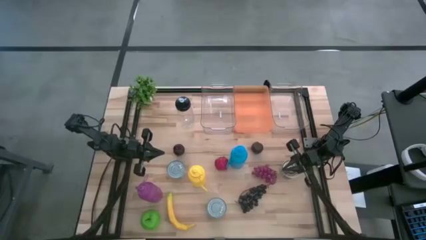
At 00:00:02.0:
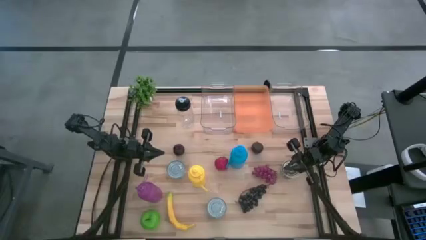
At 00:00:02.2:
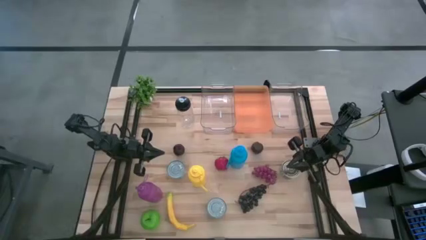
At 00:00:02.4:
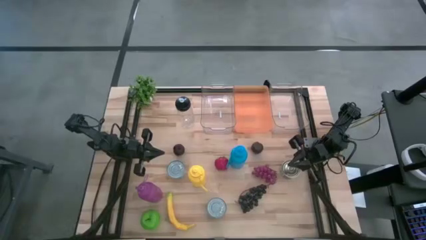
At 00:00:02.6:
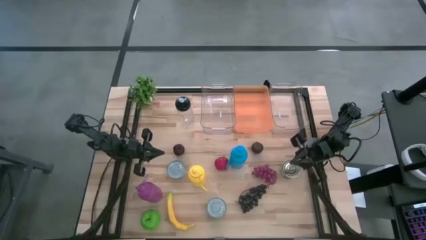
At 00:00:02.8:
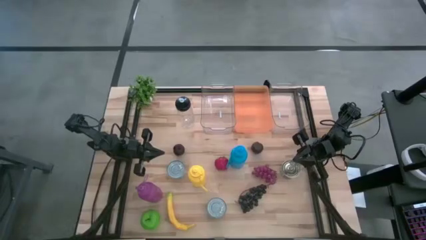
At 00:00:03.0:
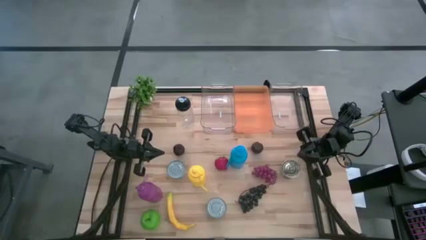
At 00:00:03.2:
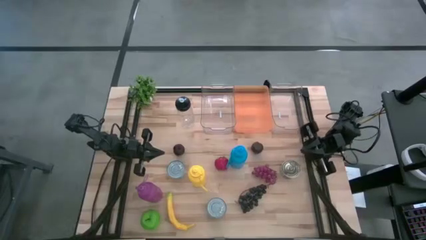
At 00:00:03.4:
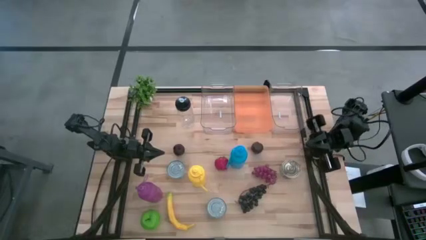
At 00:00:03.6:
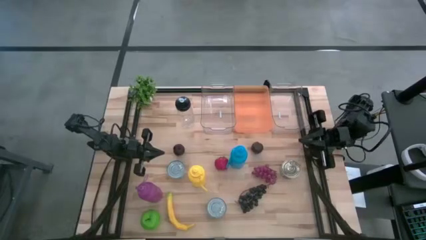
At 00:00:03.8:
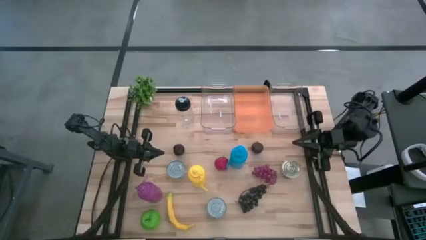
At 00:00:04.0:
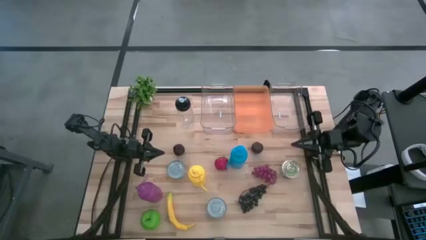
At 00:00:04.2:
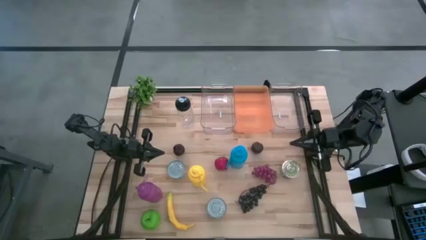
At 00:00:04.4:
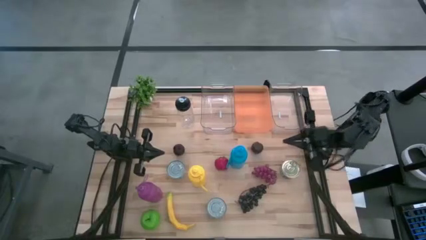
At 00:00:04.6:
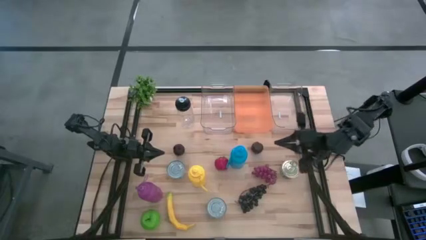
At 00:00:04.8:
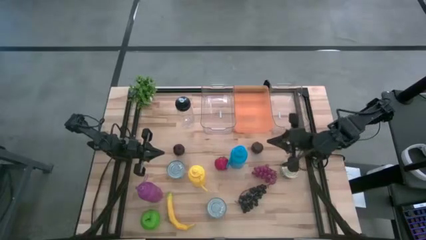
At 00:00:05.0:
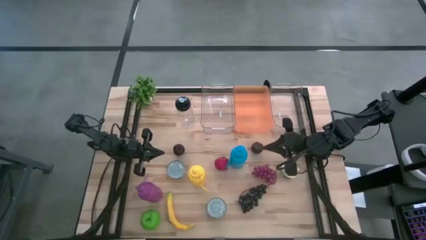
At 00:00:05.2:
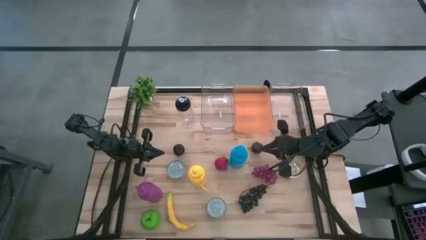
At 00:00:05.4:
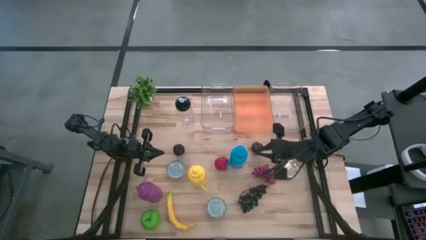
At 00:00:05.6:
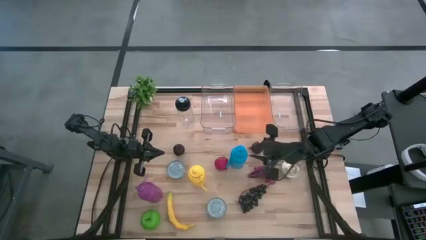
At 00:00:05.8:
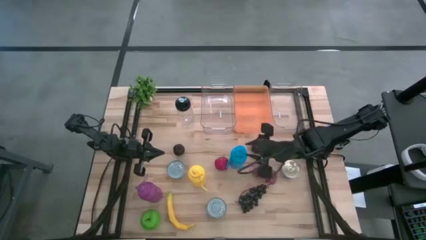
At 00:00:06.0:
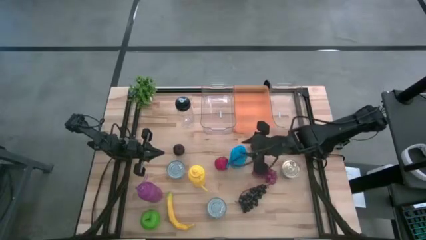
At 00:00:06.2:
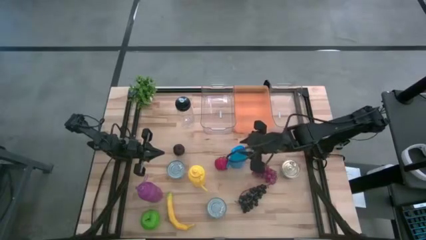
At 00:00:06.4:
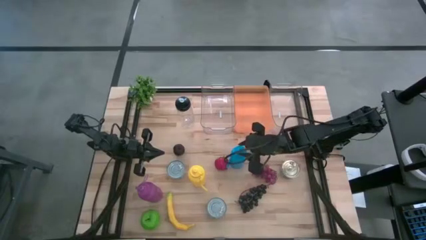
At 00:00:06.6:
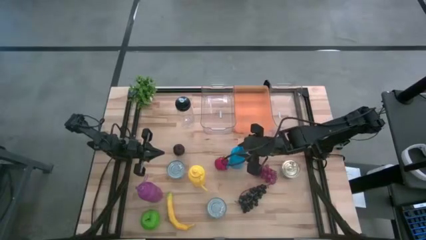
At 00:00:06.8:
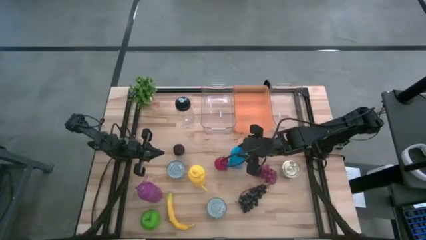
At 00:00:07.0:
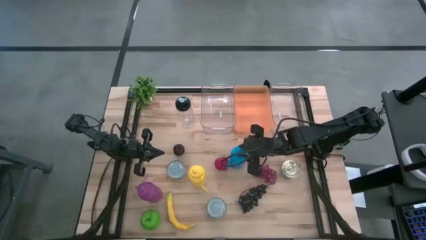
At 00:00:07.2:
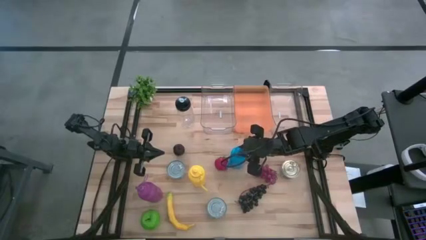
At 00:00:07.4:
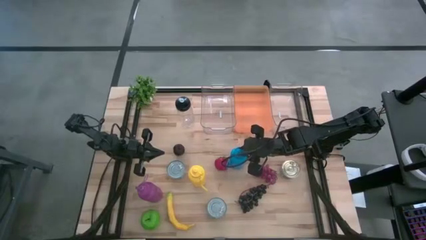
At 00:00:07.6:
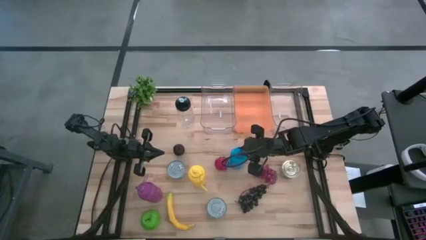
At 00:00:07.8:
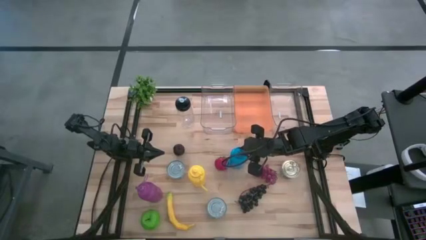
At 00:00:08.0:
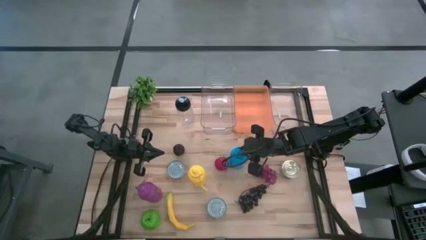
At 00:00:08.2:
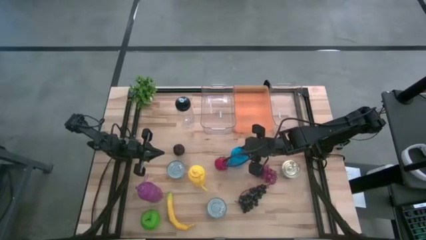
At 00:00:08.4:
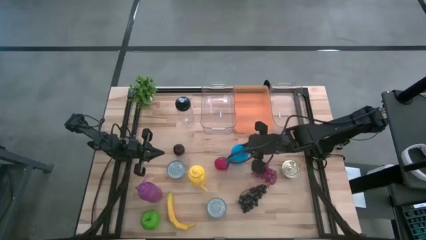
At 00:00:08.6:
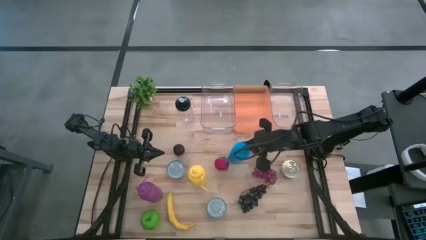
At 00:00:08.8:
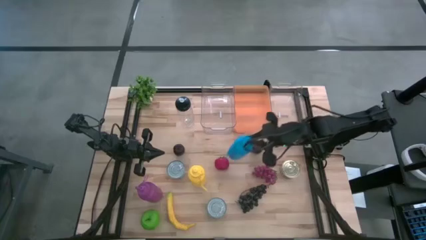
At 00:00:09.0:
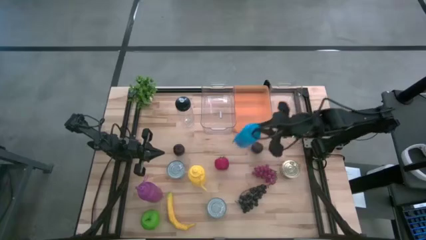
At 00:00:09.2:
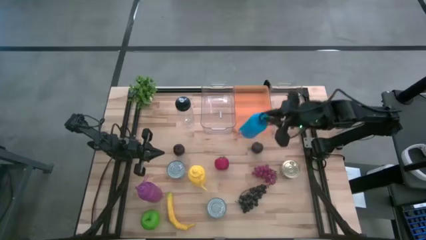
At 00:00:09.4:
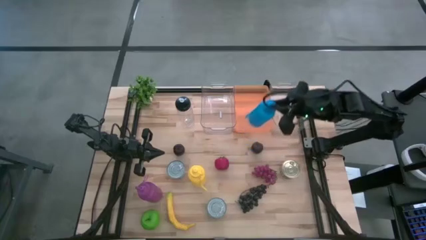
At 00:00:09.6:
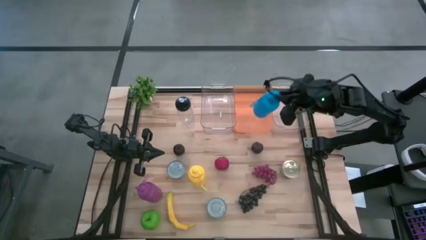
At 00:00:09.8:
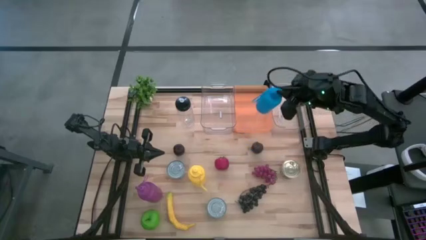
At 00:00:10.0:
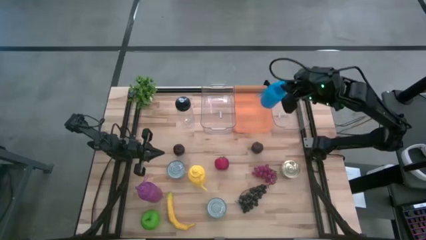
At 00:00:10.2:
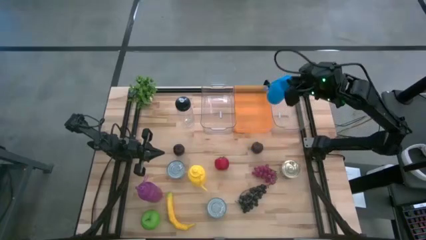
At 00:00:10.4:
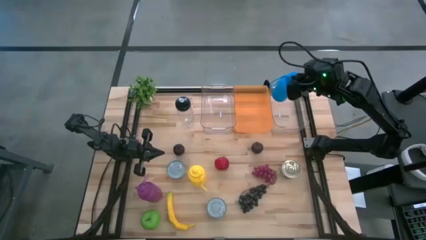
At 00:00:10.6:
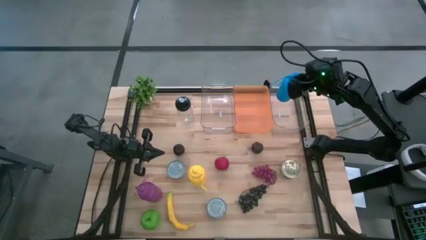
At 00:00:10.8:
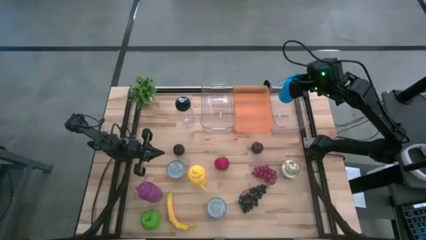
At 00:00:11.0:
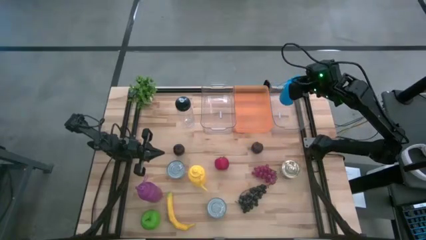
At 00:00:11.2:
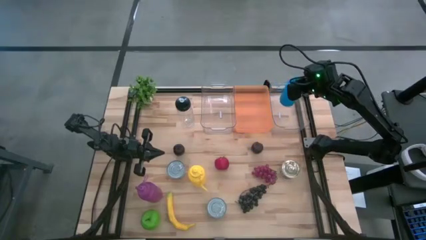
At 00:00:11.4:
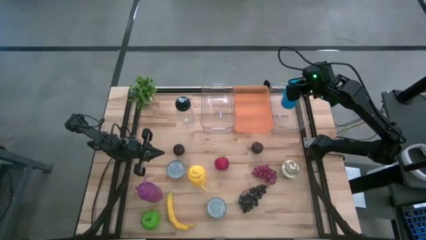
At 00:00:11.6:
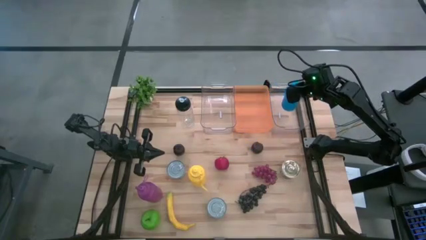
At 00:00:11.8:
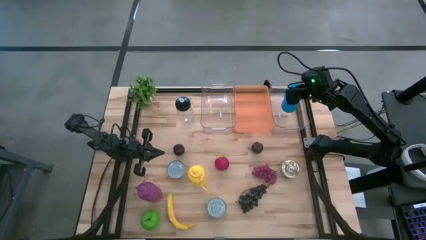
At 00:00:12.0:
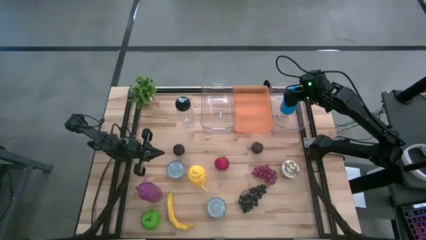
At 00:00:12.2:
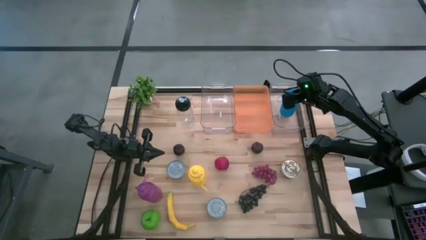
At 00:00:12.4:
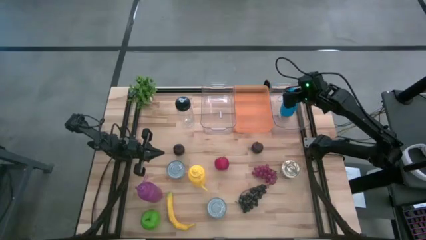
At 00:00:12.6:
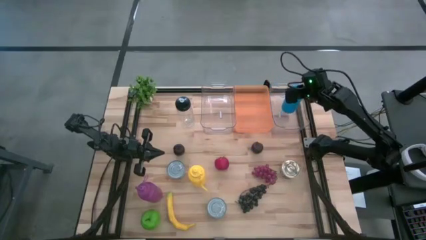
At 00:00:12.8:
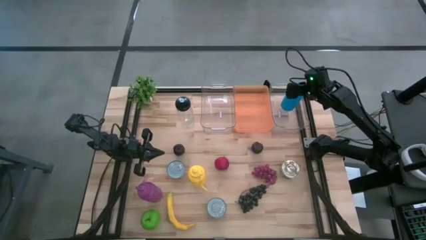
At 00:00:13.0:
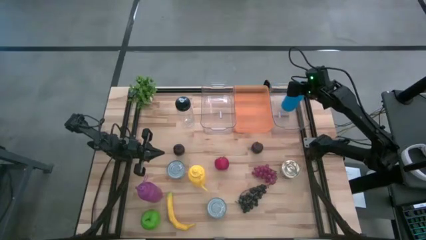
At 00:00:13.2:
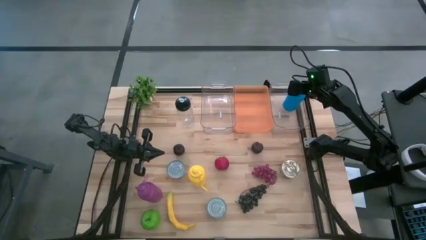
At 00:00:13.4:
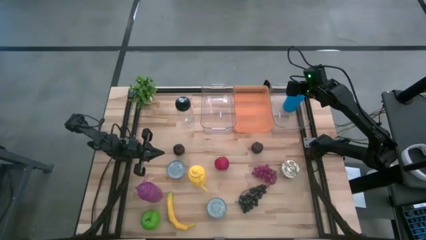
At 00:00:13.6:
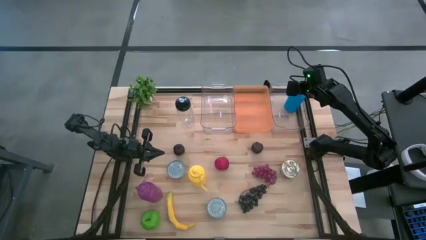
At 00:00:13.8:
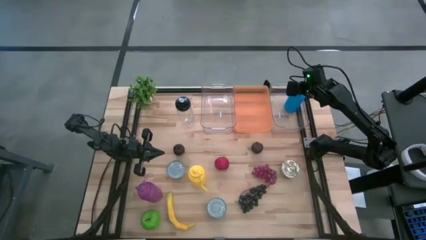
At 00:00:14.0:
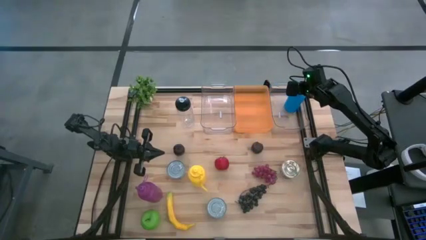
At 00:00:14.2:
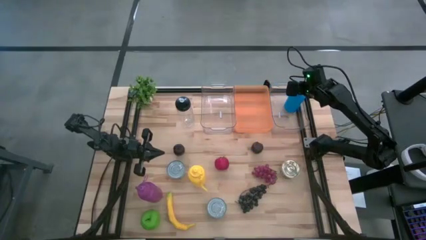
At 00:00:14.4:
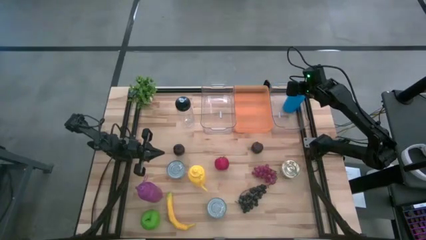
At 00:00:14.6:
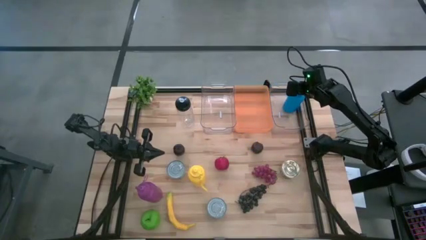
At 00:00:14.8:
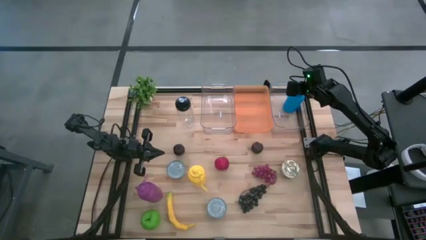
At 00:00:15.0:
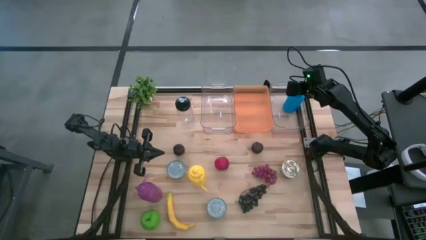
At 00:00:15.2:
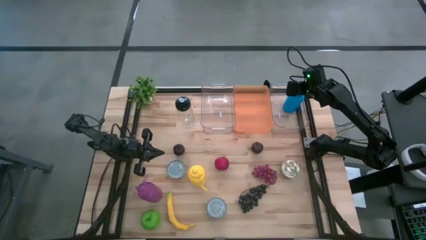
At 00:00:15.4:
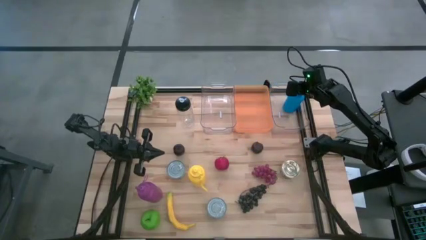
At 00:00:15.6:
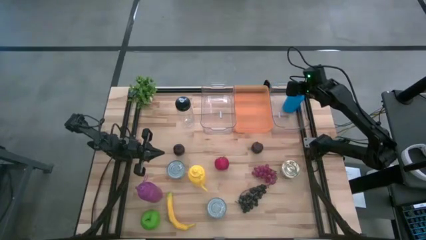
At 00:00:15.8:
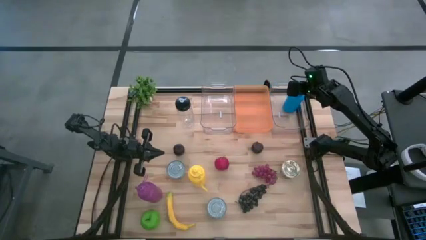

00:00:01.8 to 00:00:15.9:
Task: Pick & Place Food Item
Put the blue tumbler into the right transparent bin
